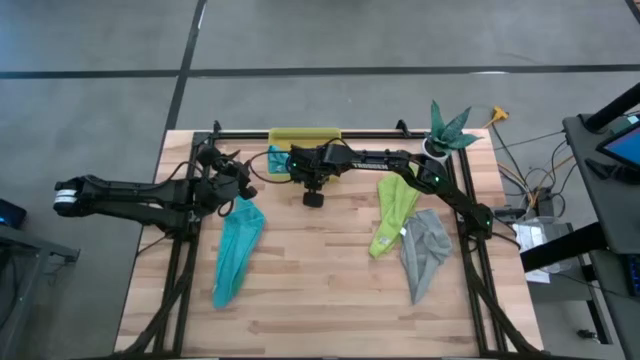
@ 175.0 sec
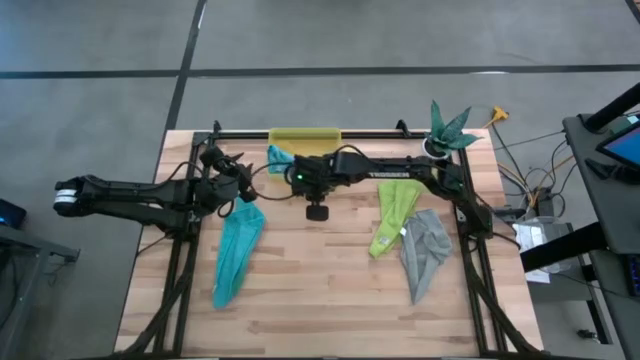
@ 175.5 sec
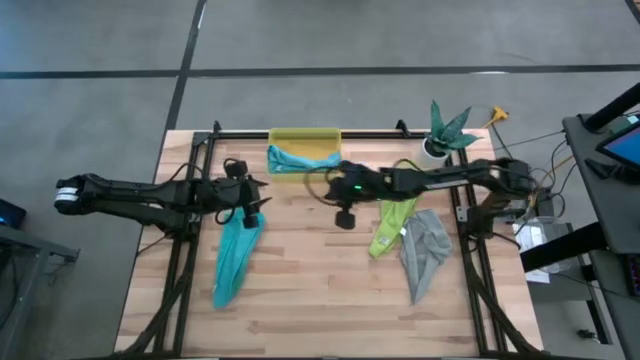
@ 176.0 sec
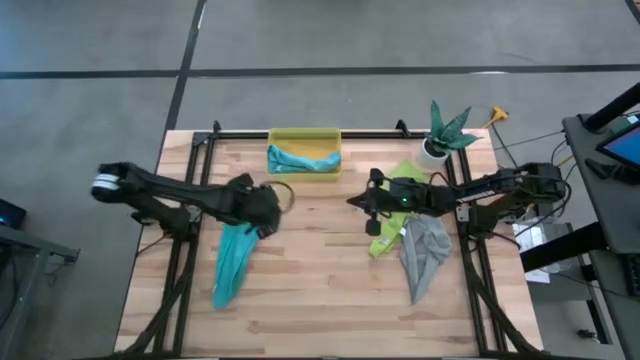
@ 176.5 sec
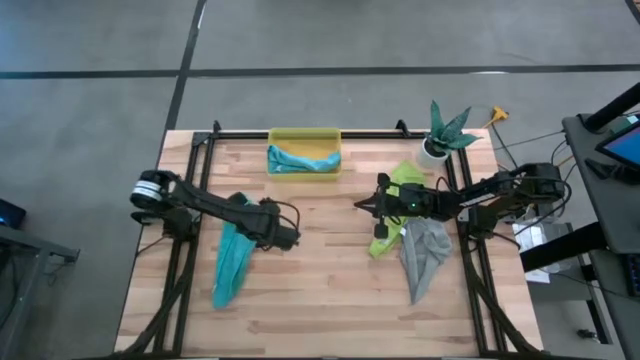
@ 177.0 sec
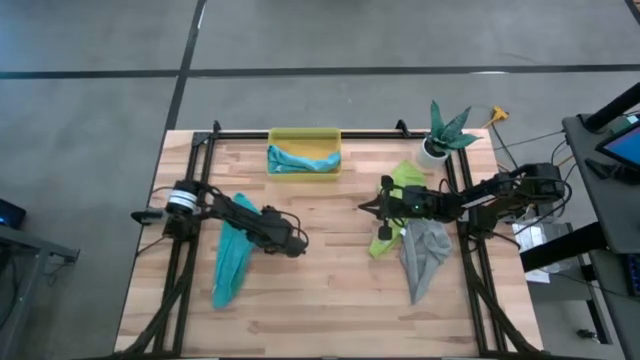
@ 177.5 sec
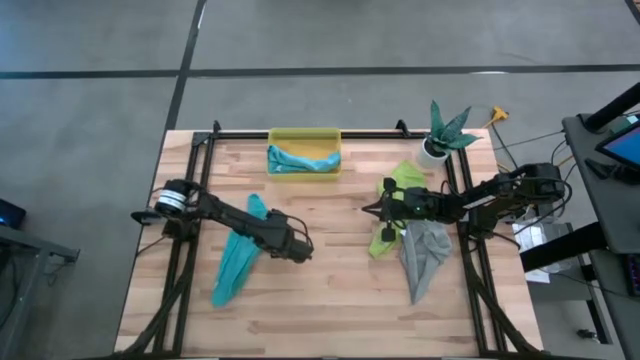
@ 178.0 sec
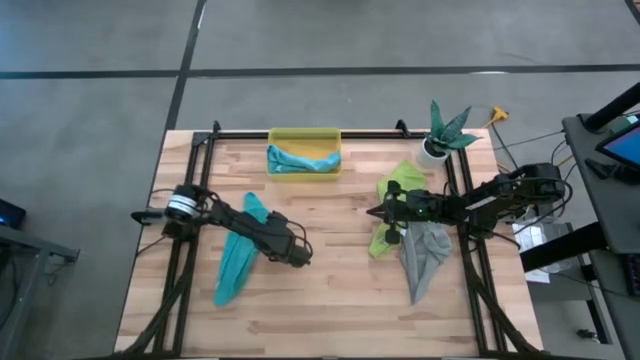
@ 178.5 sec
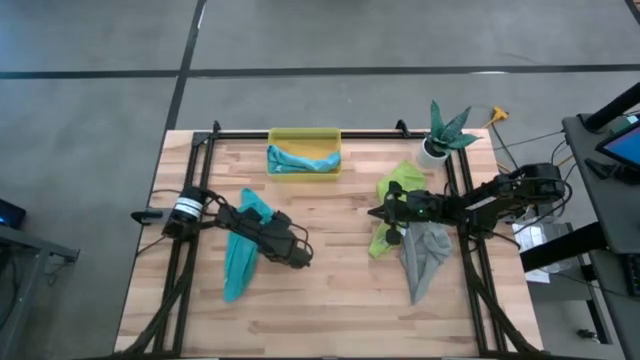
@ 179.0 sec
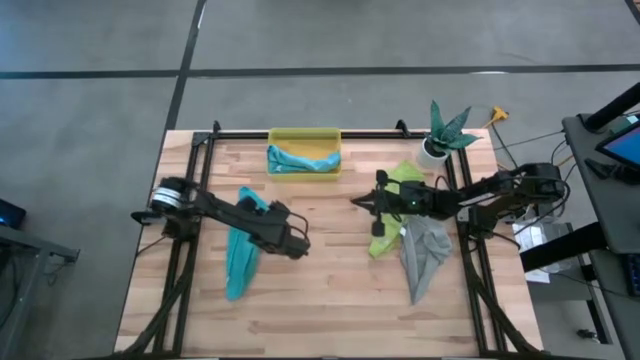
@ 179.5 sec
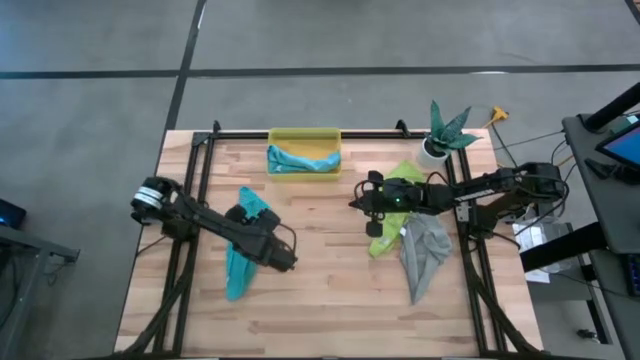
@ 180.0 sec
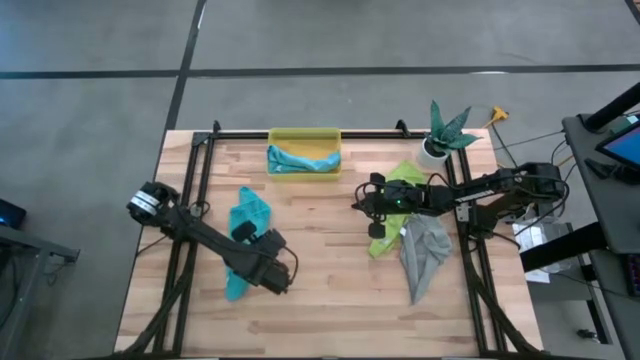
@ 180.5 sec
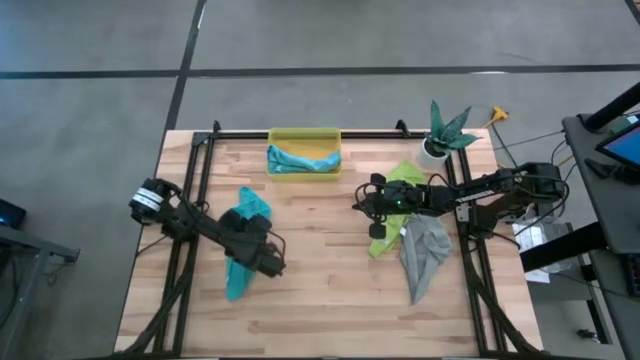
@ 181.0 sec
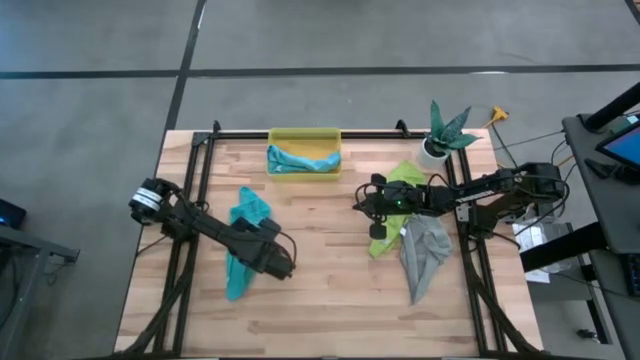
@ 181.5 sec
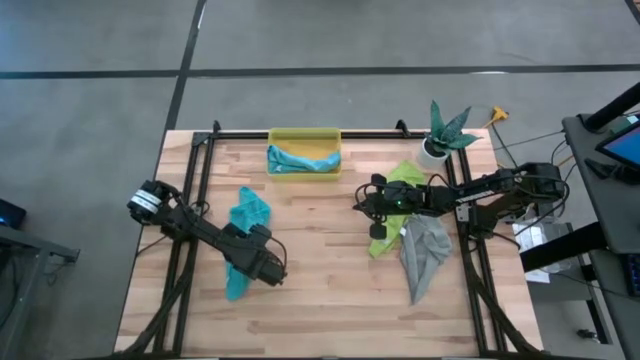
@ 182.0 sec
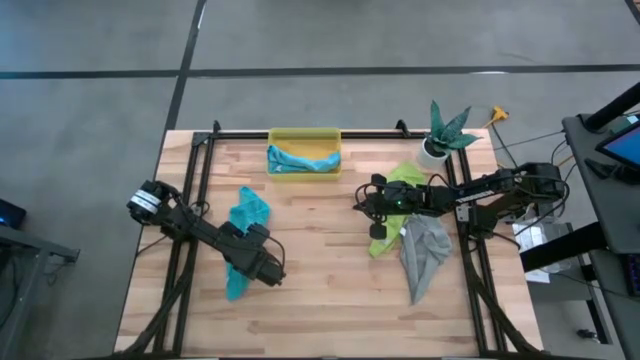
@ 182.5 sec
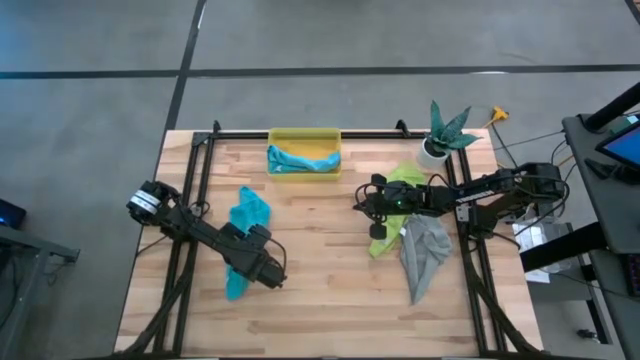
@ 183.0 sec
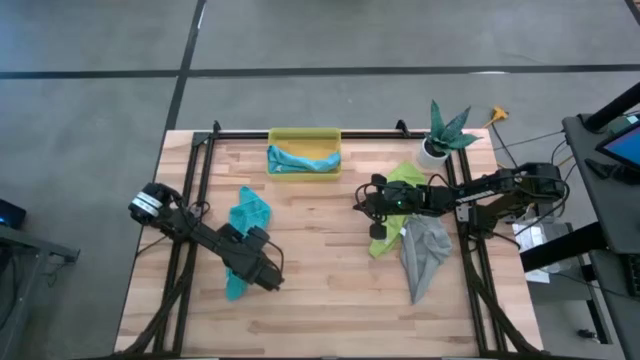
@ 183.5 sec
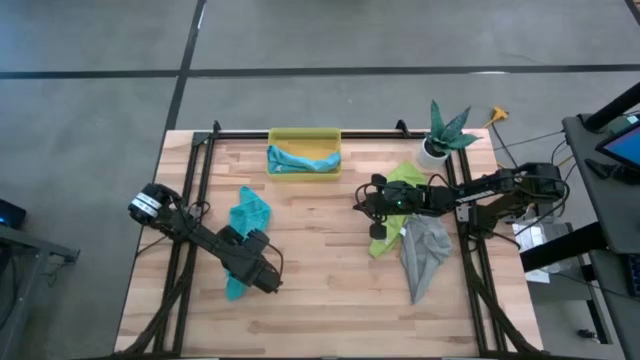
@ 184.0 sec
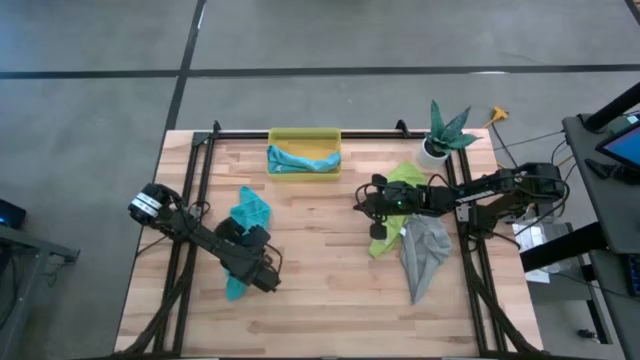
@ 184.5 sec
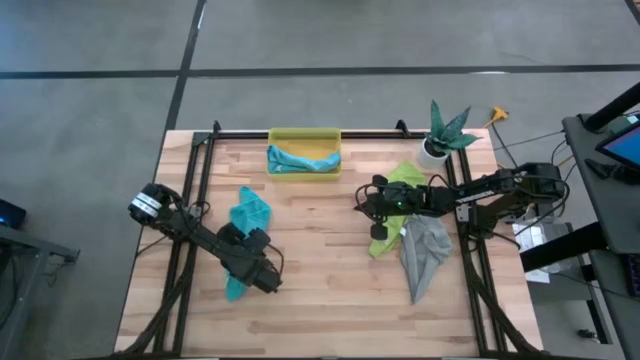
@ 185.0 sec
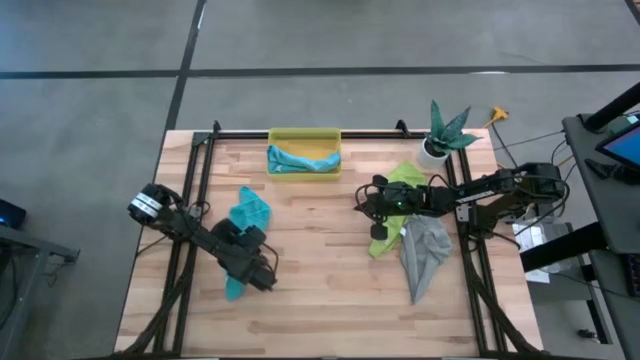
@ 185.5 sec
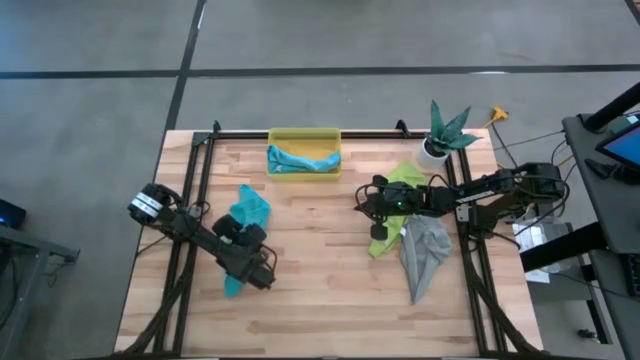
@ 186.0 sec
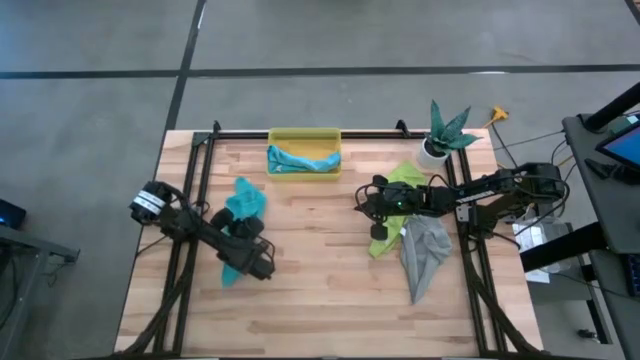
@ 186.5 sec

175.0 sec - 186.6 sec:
Task: Roll microfiber towels into tight, uniform cylinder then place into a basket
Roll the light blue towel

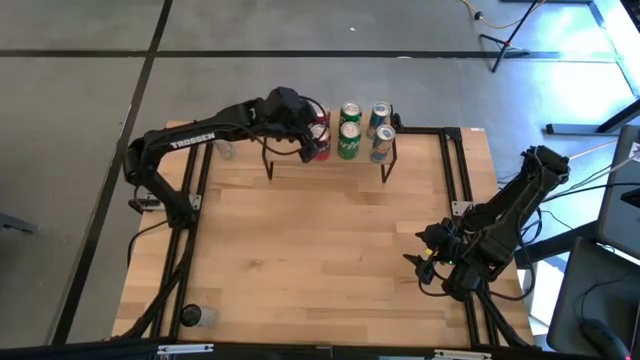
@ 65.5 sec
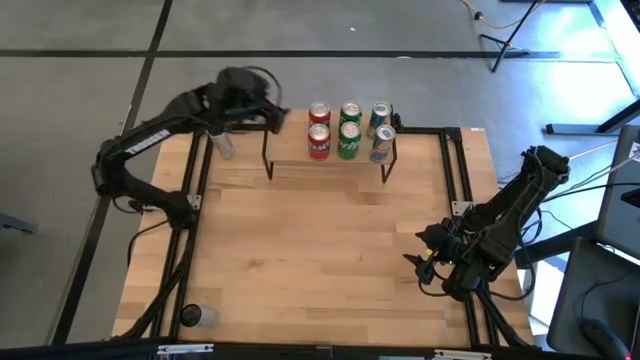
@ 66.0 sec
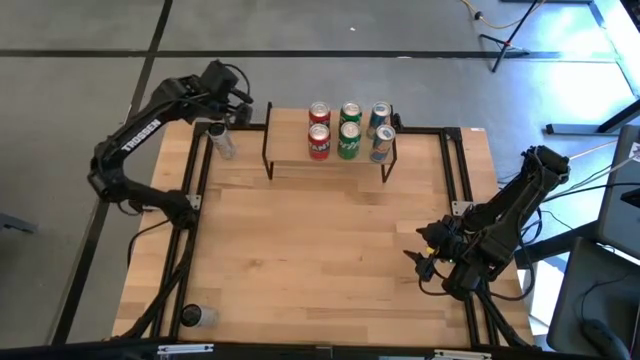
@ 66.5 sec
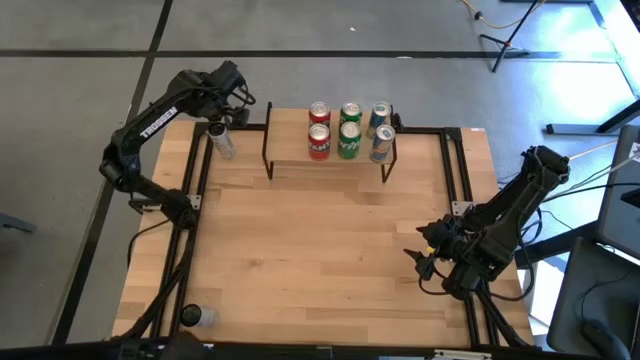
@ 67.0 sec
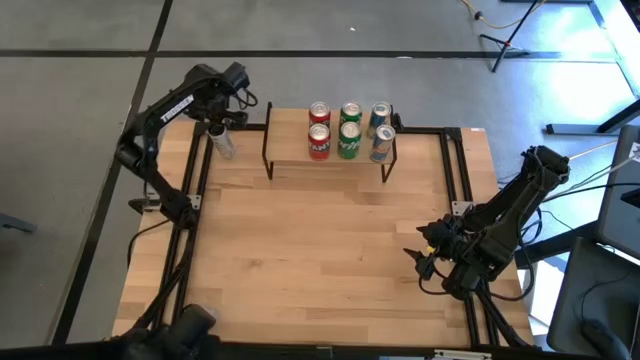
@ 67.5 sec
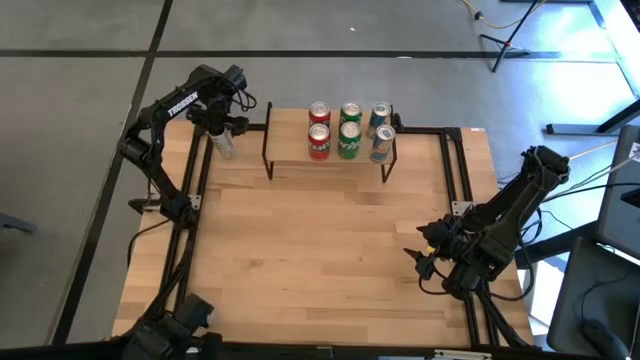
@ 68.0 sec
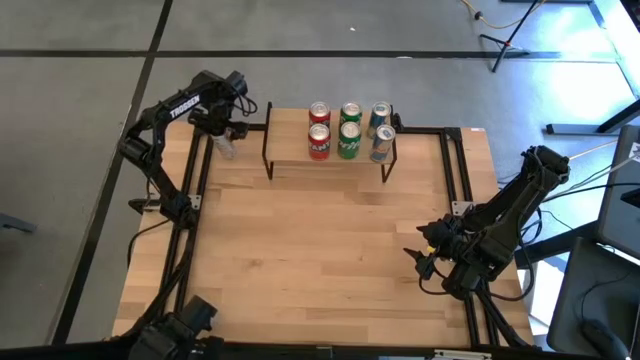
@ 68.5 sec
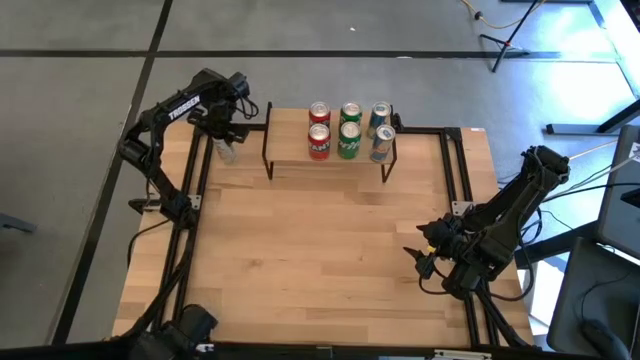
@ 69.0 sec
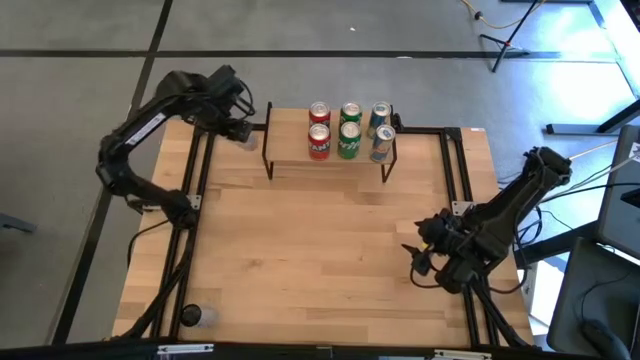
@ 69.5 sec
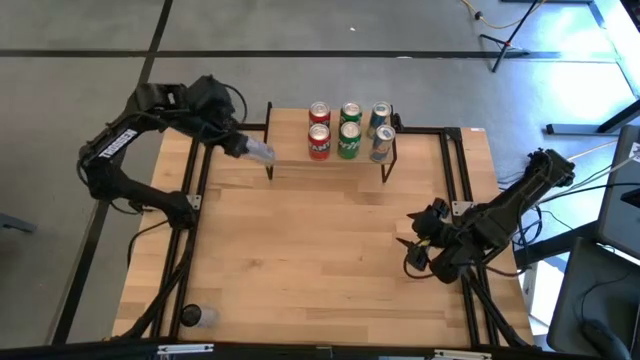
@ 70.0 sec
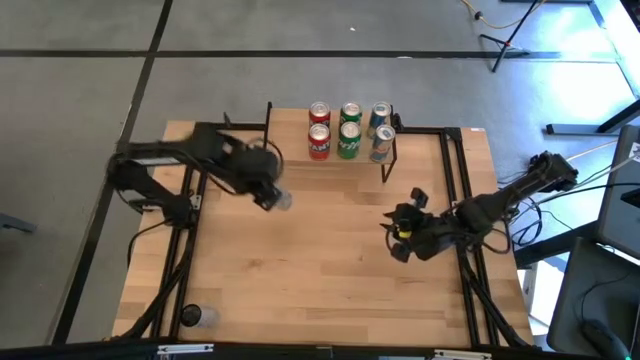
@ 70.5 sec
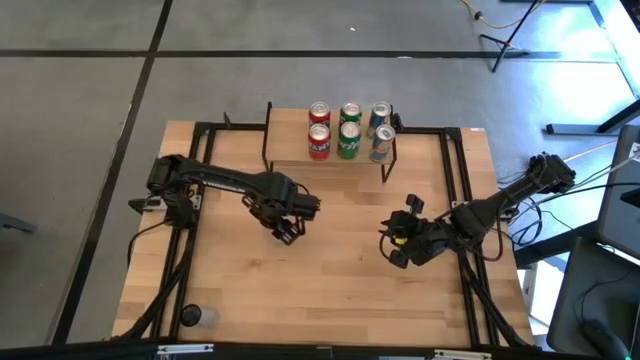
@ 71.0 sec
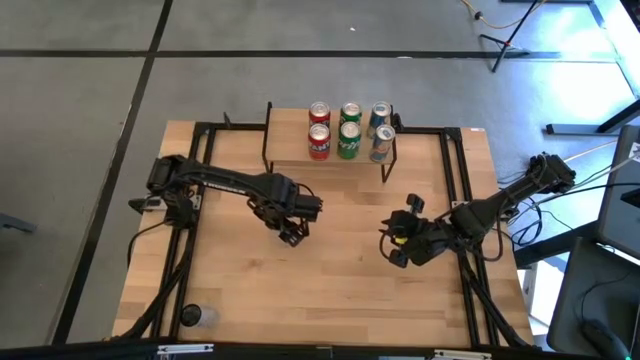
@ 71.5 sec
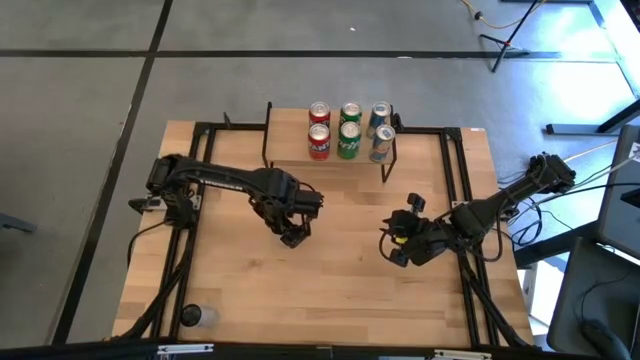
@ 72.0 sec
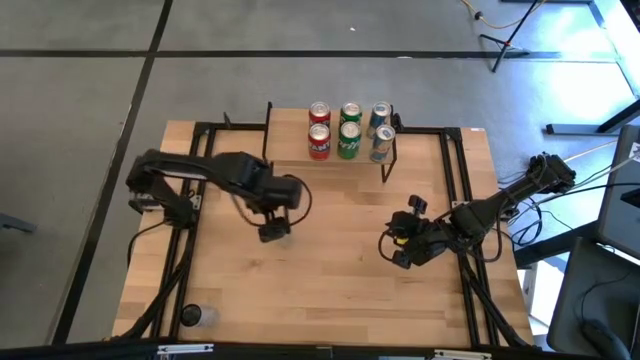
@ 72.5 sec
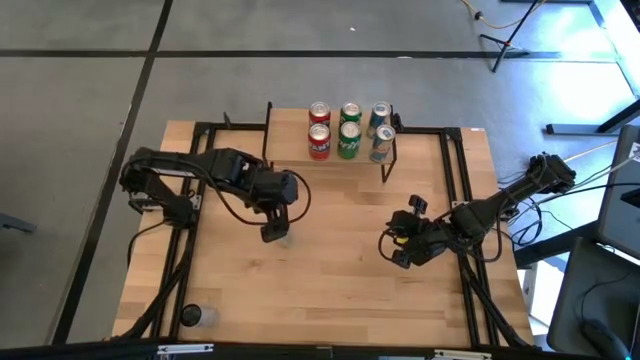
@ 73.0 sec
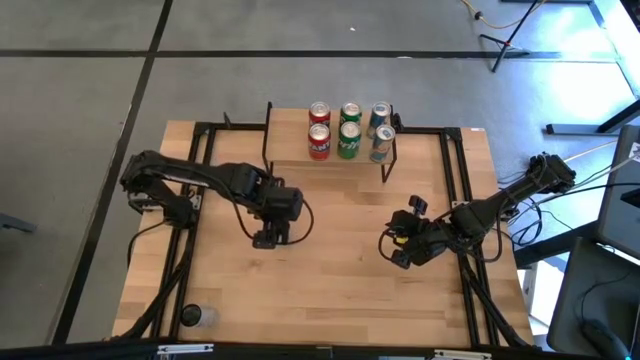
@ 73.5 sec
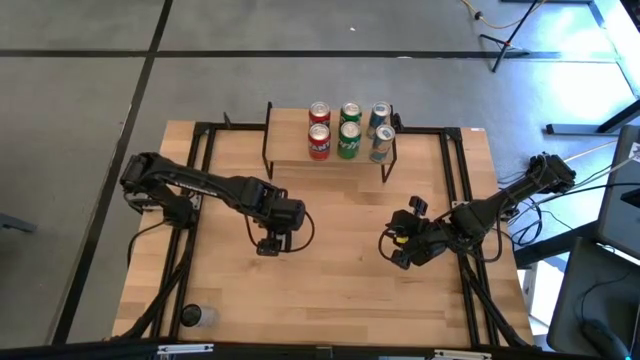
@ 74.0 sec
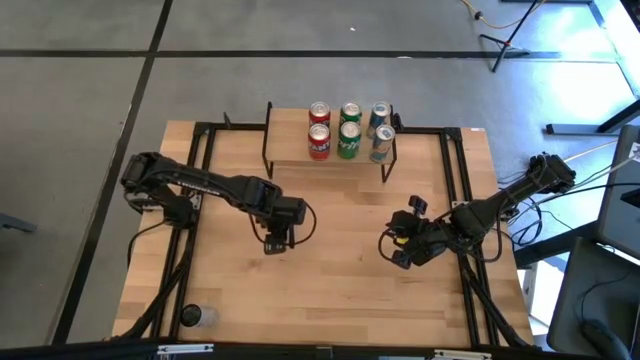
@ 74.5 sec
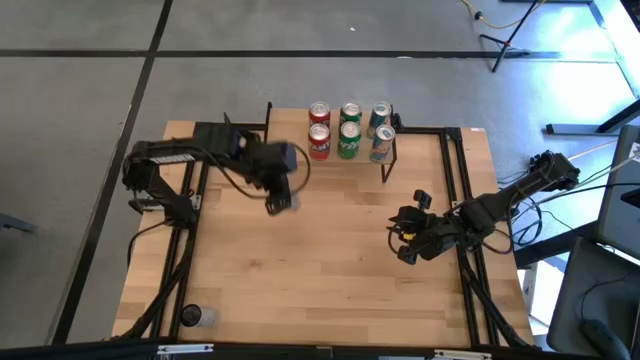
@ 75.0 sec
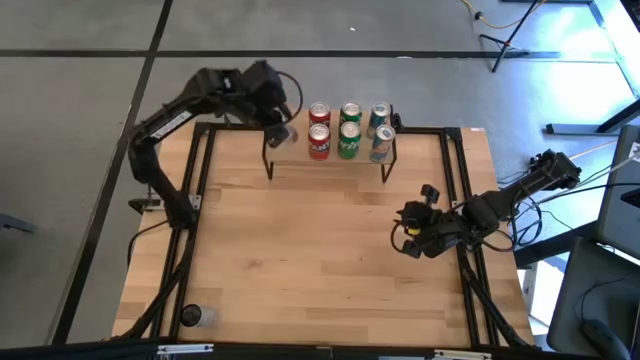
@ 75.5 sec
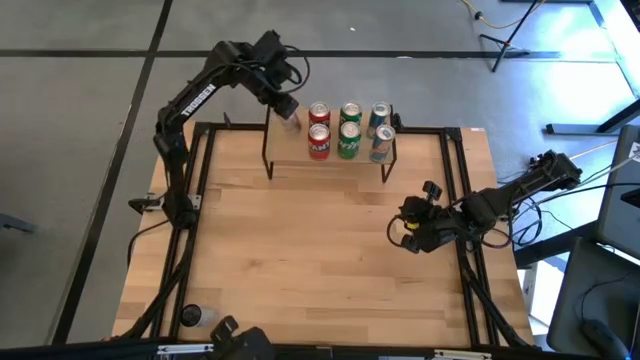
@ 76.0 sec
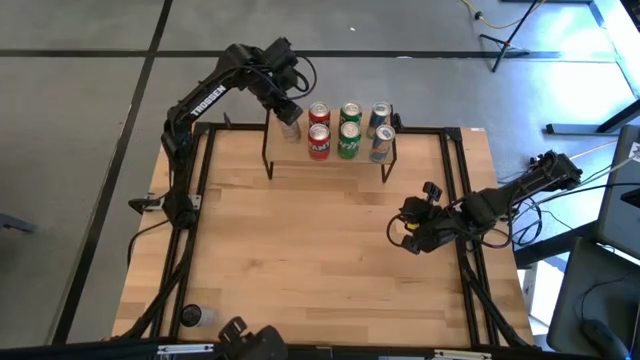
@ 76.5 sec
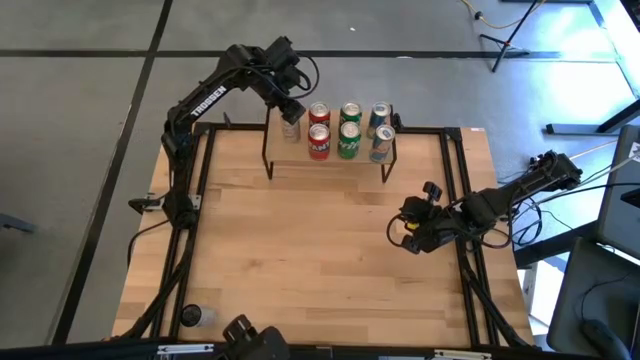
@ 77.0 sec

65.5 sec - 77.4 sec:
Task: Place canned beverage on shelf
Put the top white and yellow soda can on the shelf
